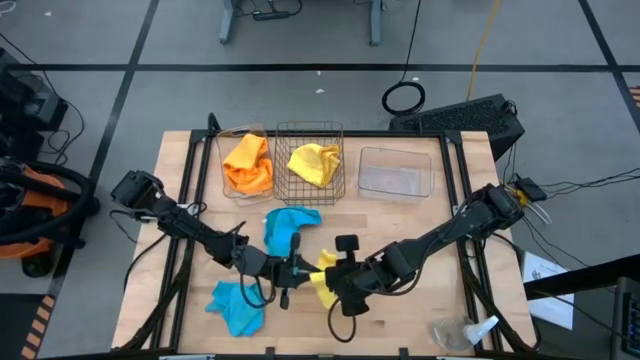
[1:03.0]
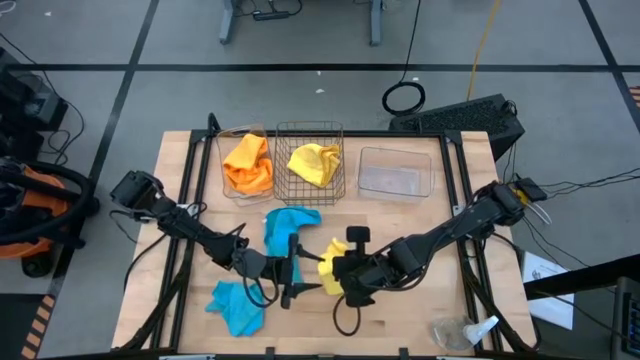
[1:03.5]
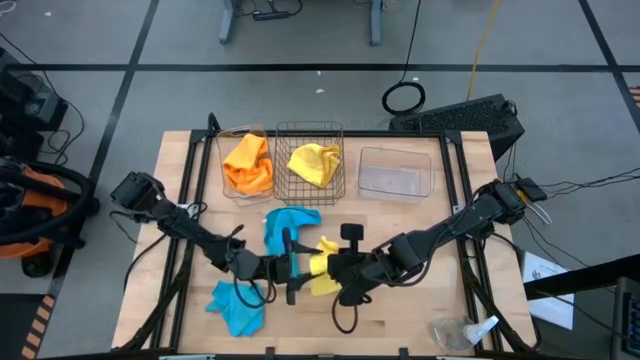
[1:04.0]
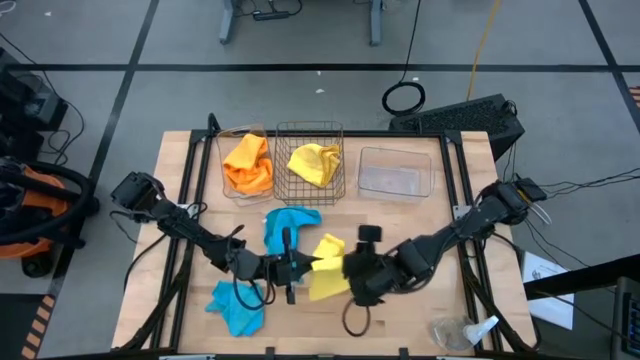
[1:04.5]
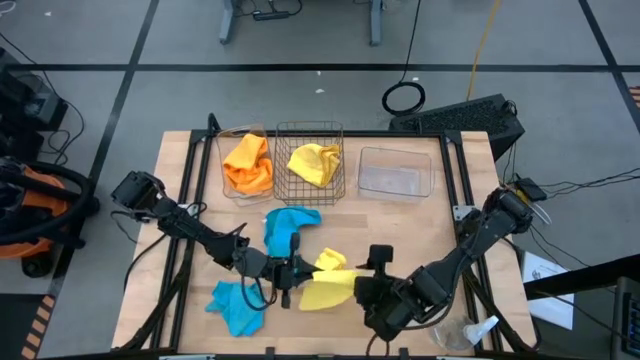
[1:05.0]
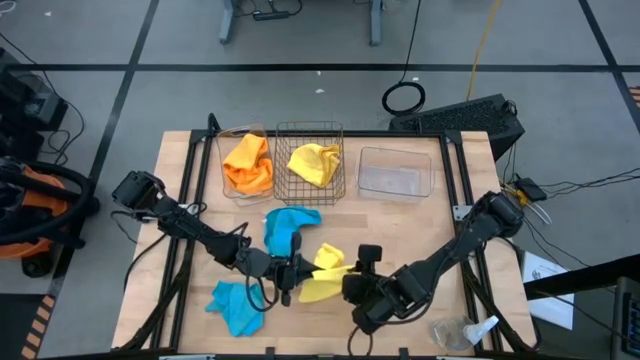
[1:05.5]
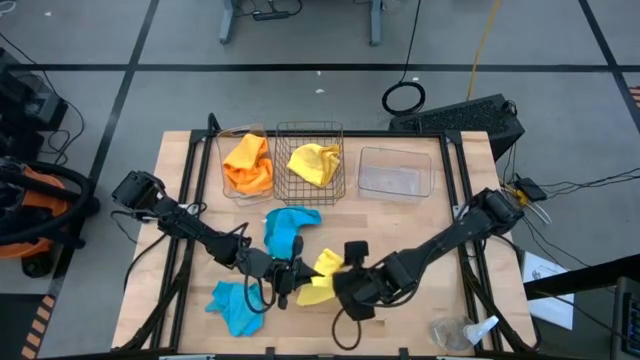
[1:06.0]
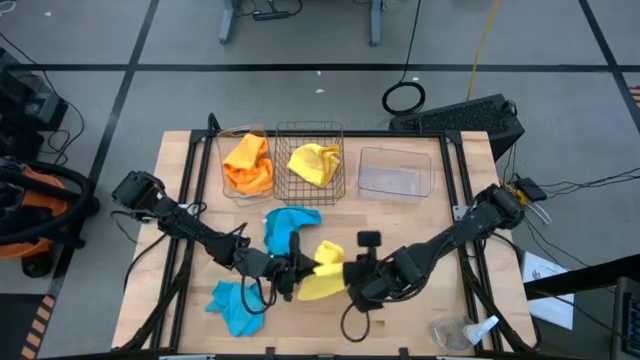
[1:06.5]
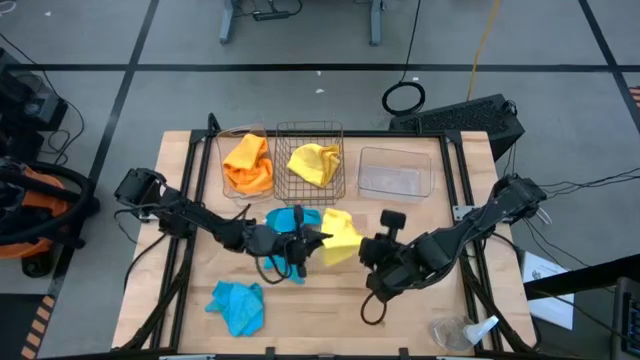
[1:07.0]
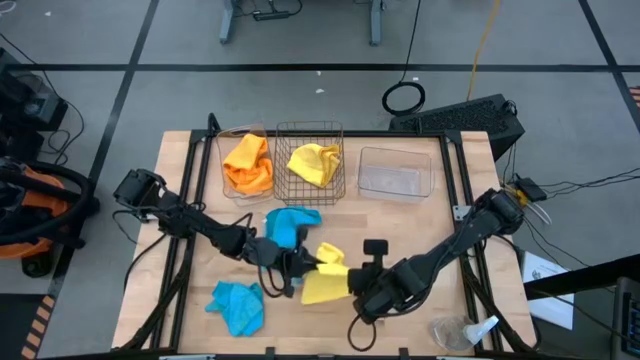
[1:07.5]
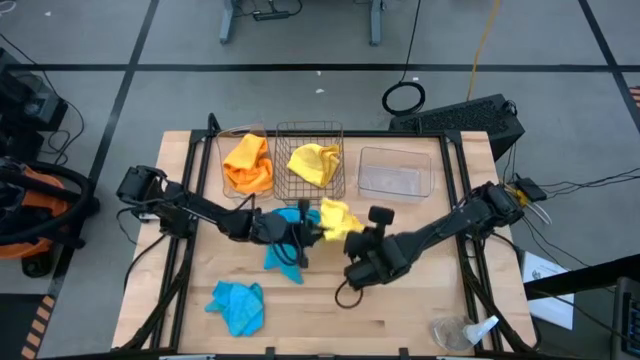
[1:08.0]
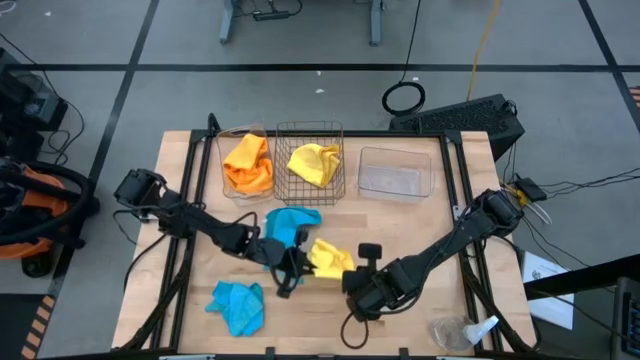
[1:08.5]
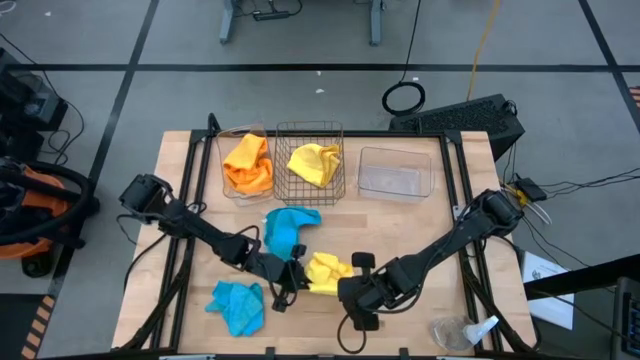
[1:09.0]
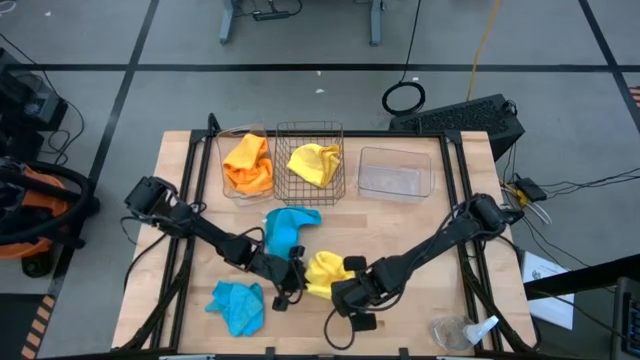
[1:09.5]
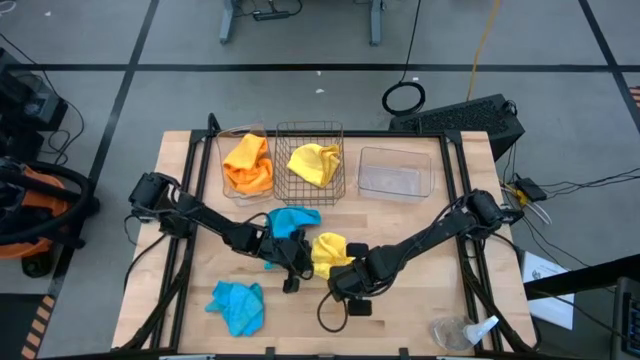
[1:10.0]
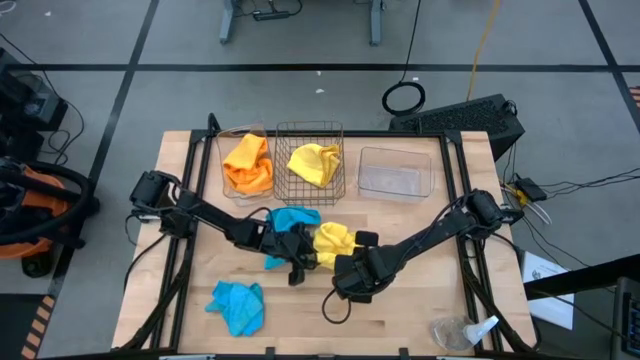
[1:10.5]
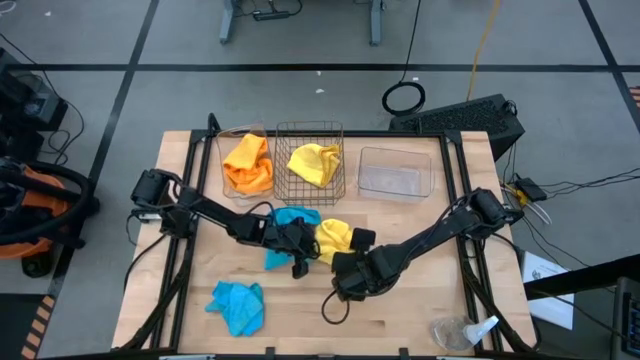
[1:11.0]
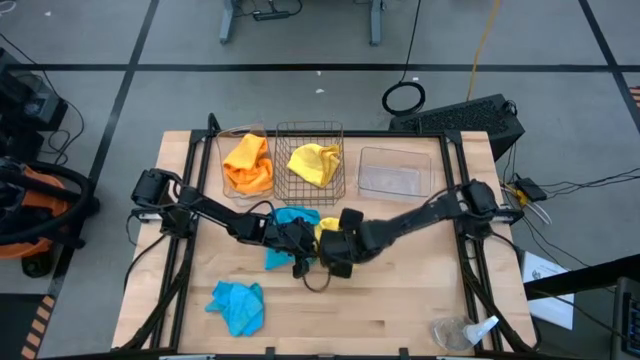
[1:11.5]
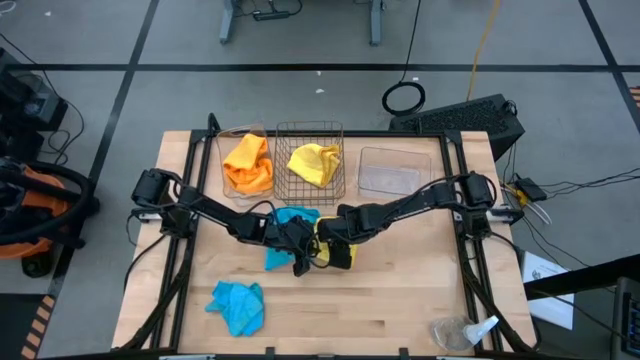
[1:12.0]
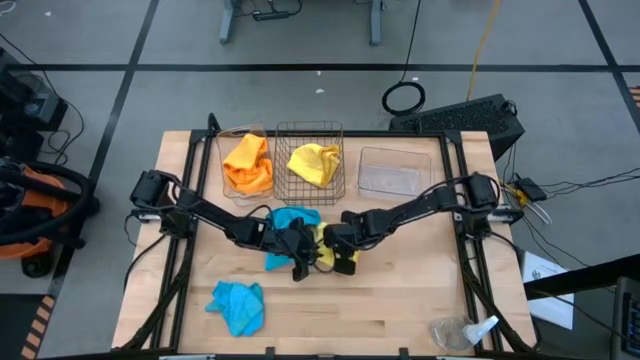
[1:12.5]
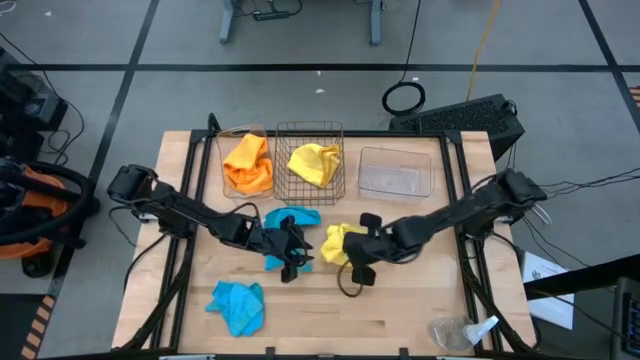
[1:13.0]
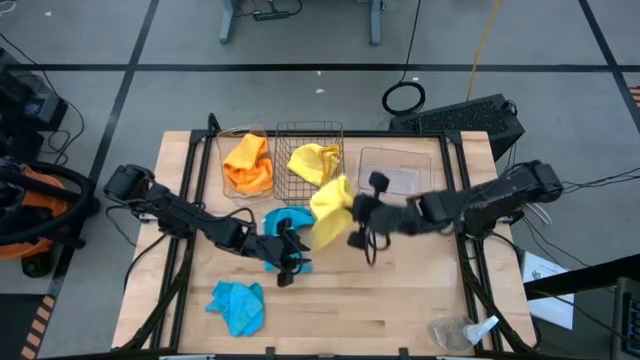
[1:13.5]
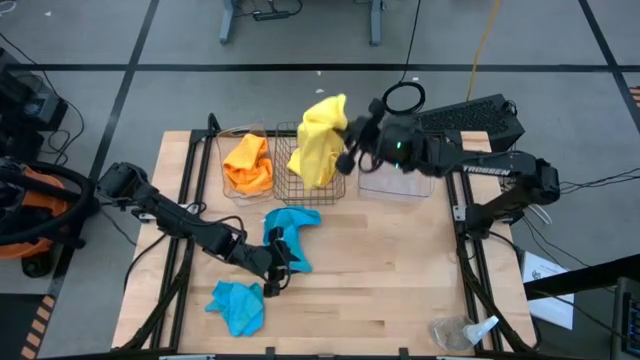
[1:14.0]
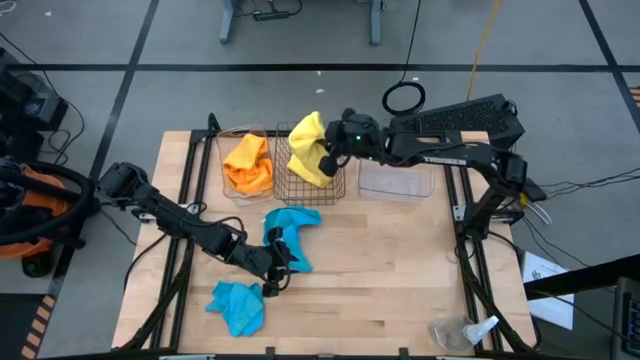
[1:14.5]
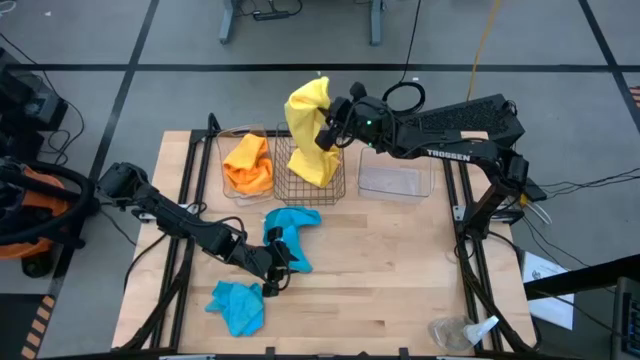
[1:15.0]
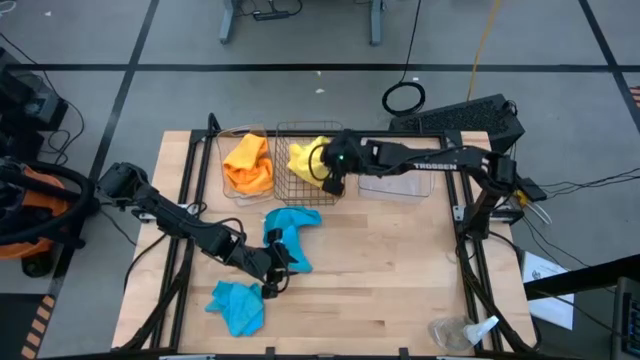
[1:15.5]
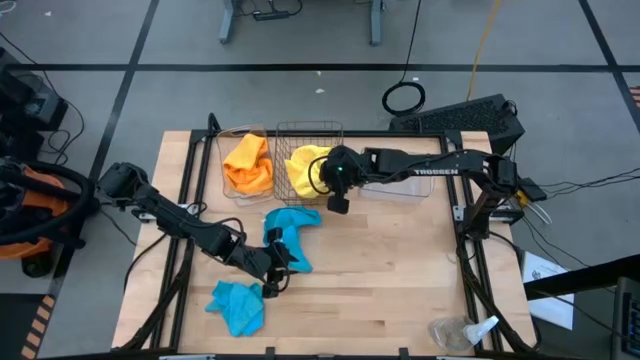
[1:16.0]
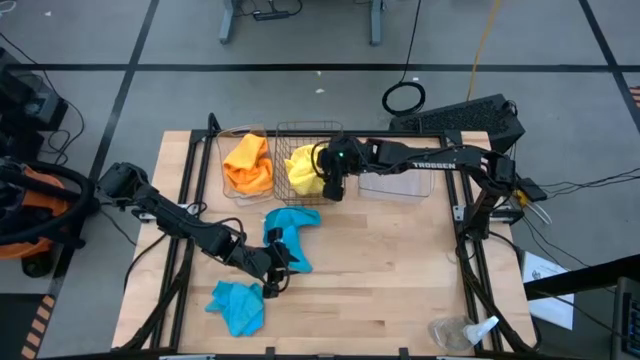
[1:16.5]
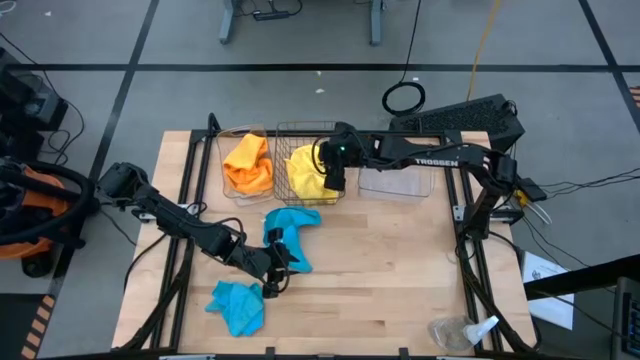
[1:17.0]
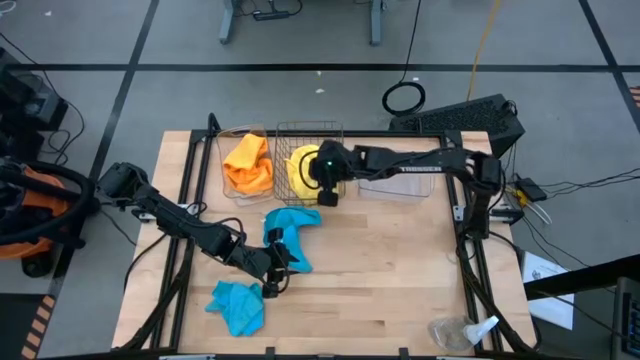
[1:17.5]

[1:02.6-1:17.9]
Task: Sort microfiber towel by color & place in baskets
Put the yellow microfiber cloth into the wire basket

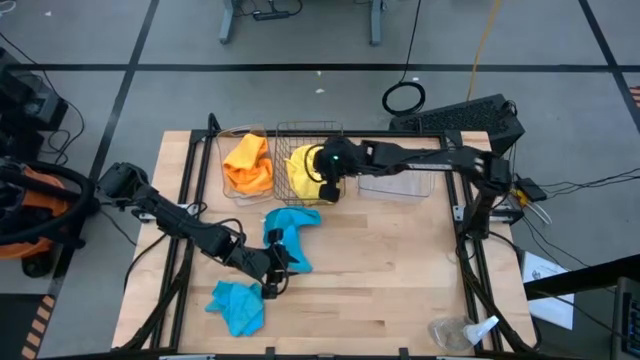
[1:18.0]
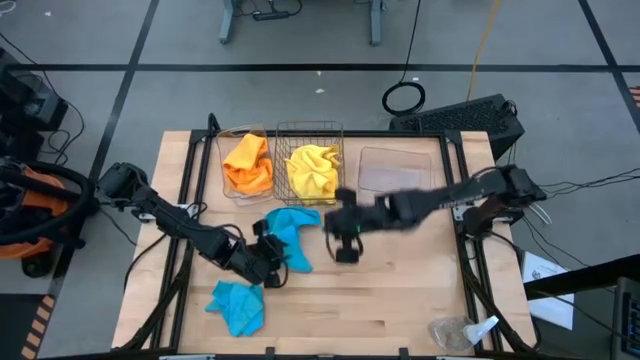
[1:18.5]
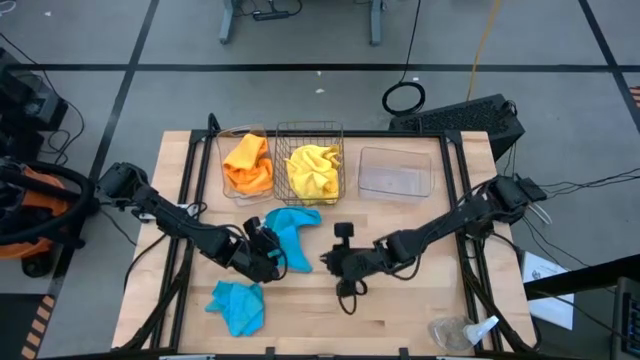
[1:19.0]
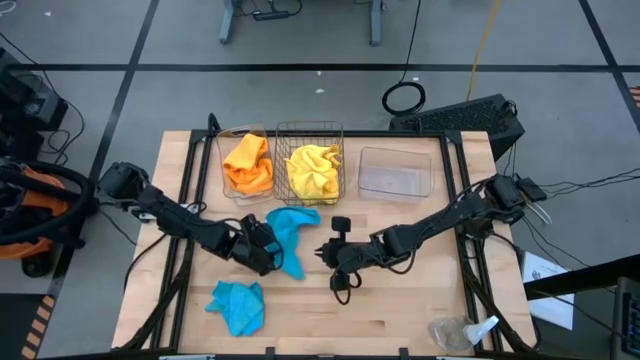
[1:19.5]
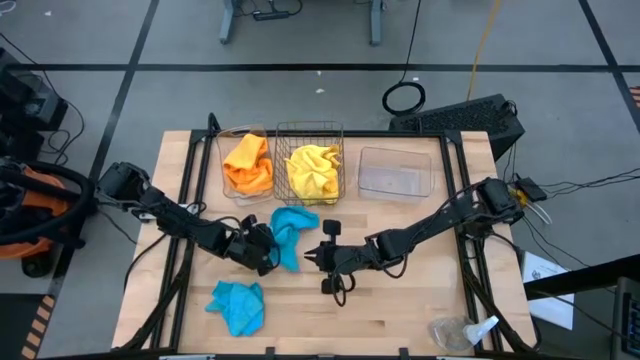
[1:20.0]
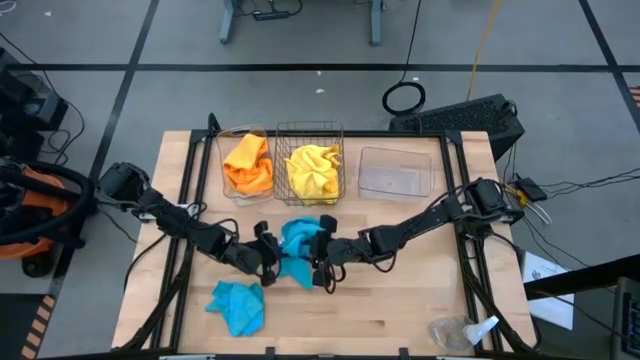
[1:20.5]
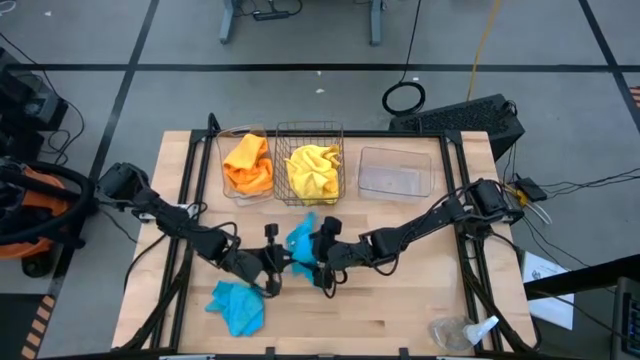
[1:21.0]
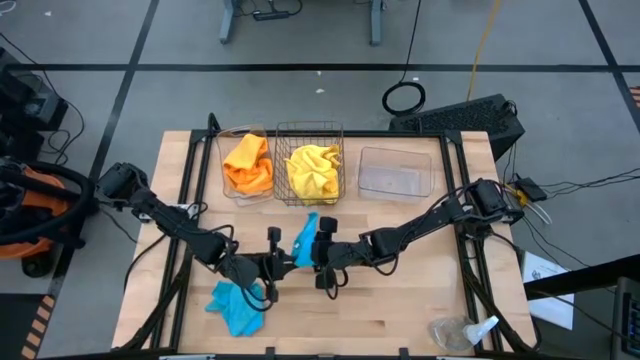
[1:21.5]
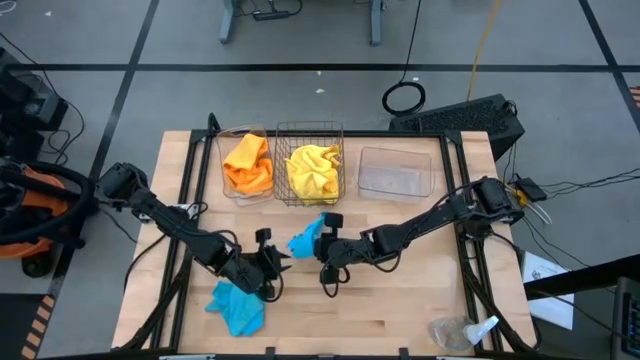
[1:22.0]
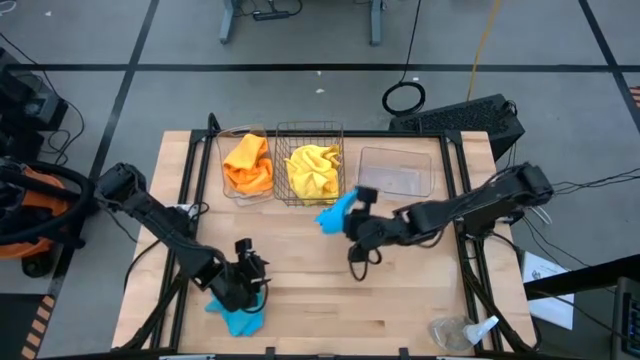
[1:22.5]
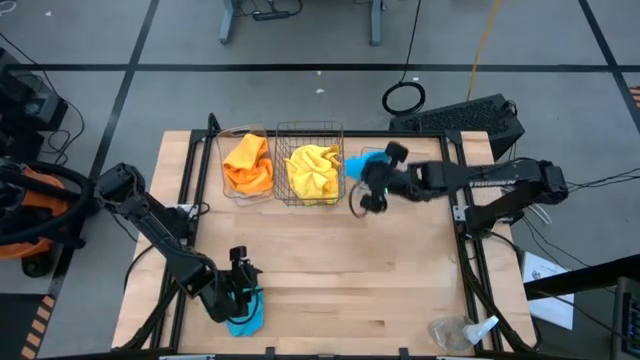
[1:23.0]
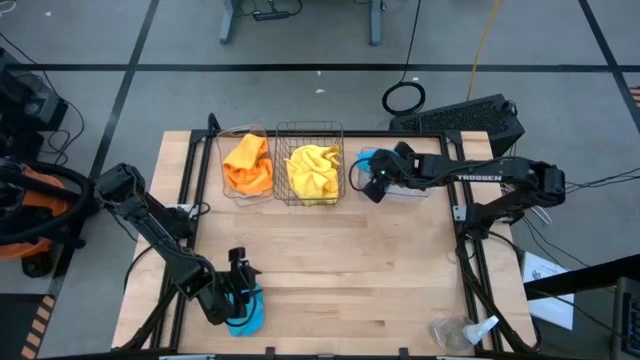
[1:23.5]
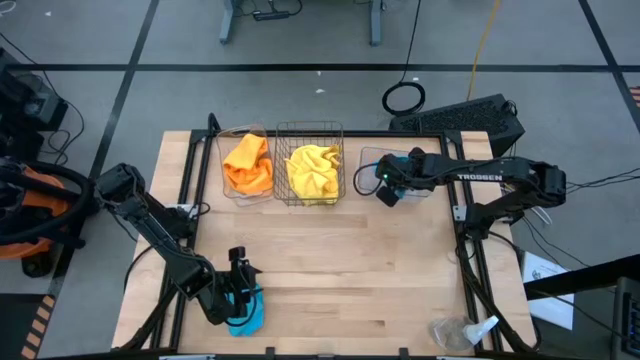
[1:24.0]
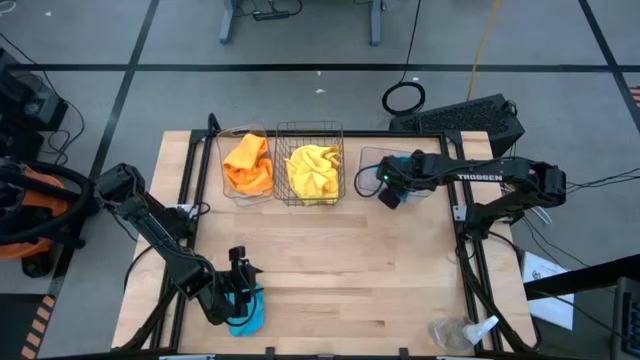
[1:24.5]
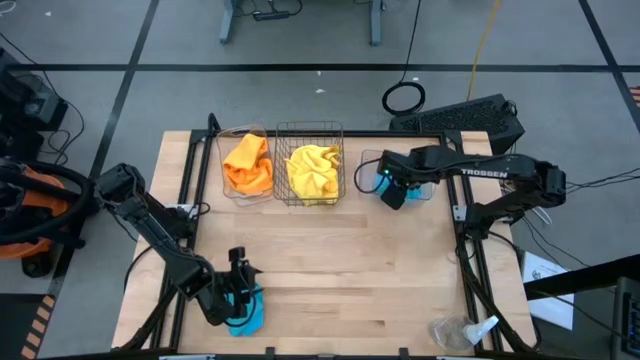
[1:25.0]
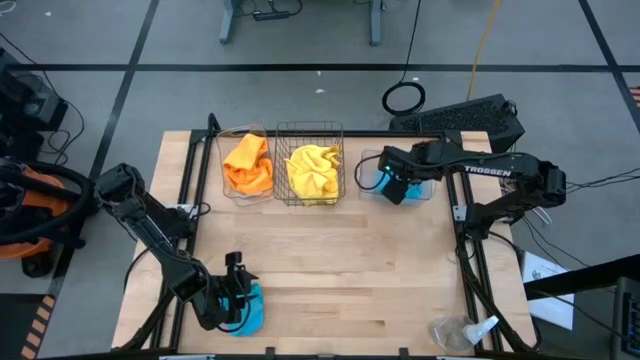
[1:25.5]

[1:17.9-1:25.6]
Put the top blue microfiber cloth into the right transparent bin
